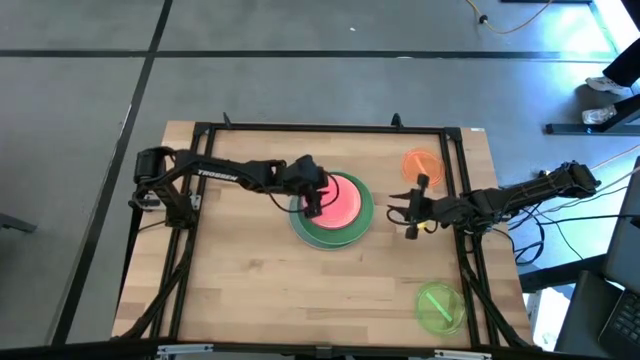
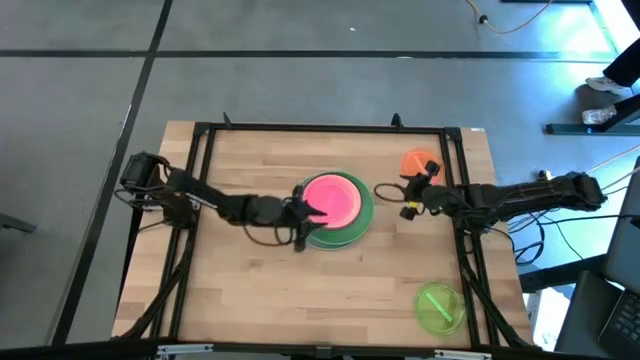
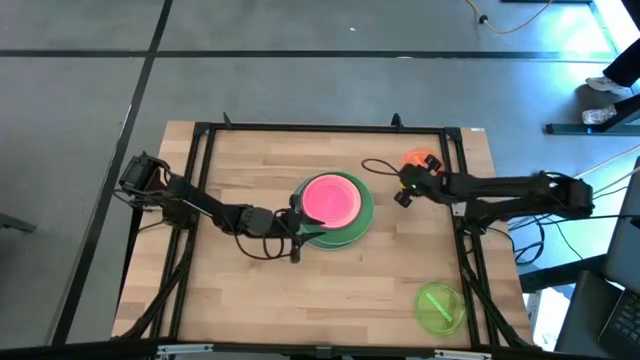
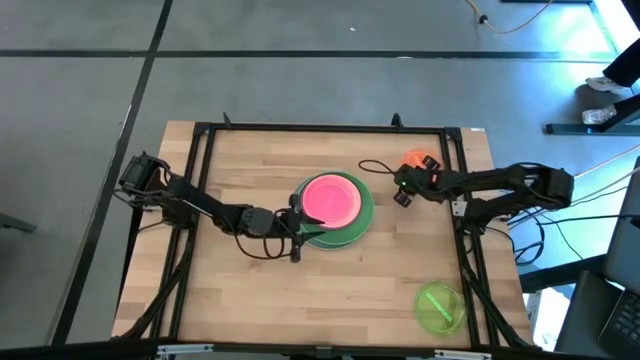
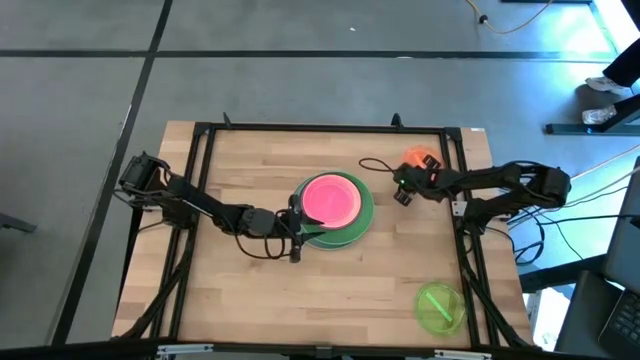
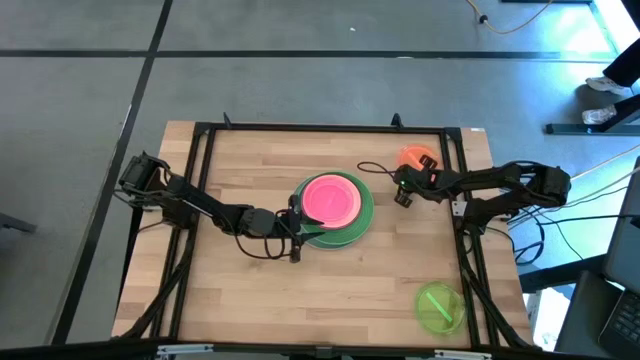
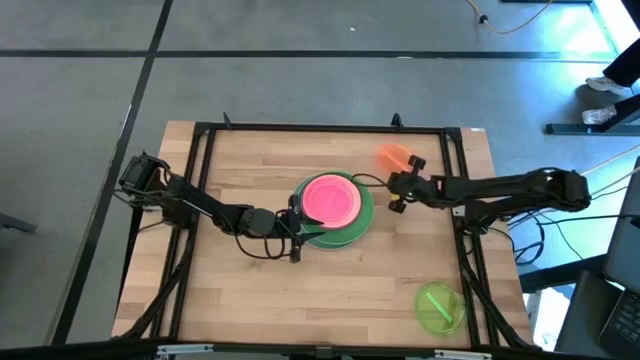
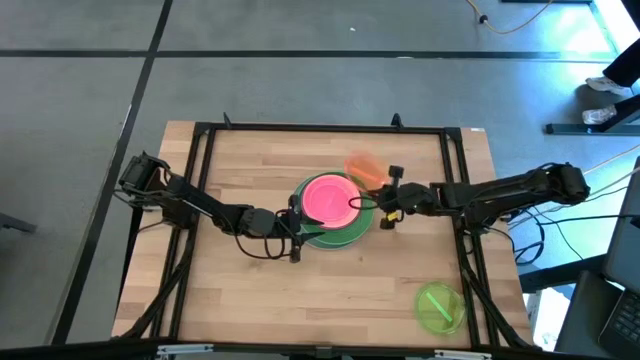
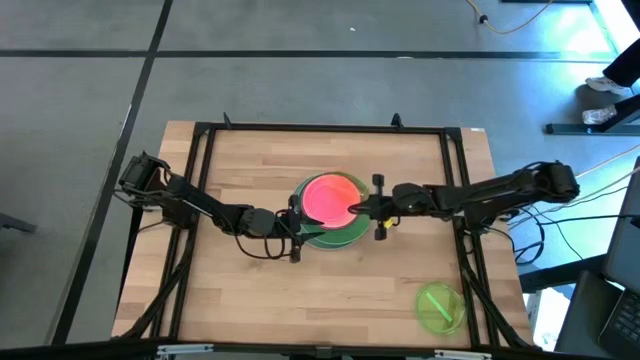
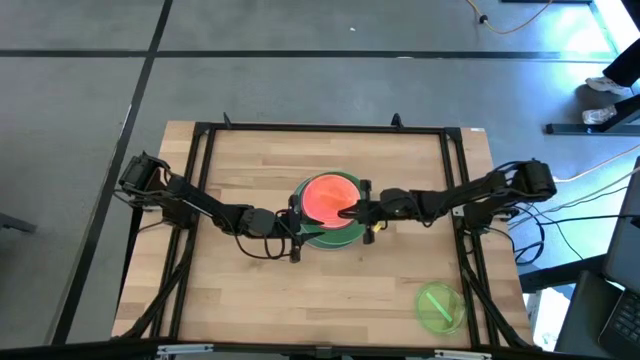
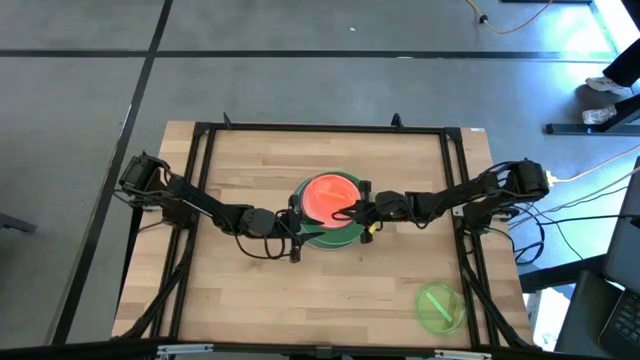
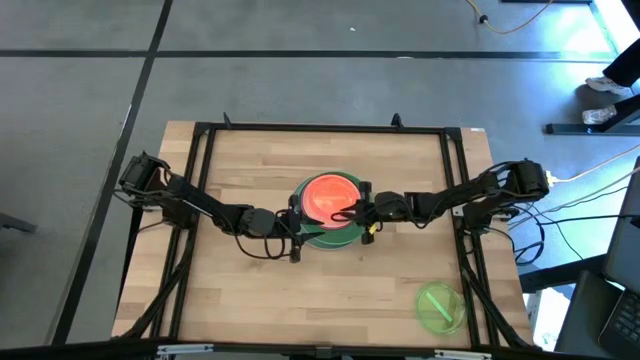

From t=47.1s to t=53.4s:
Task: Stack plastic plates
Stack the orange plate on top of the light pink plate

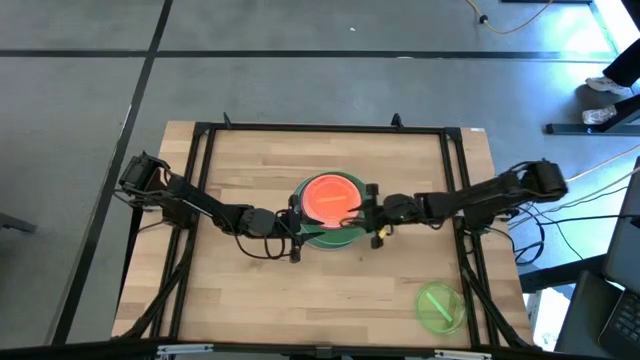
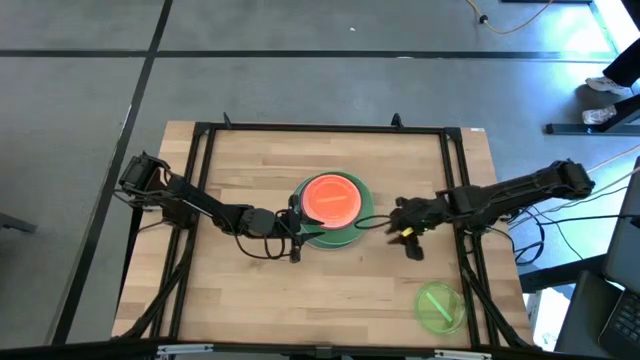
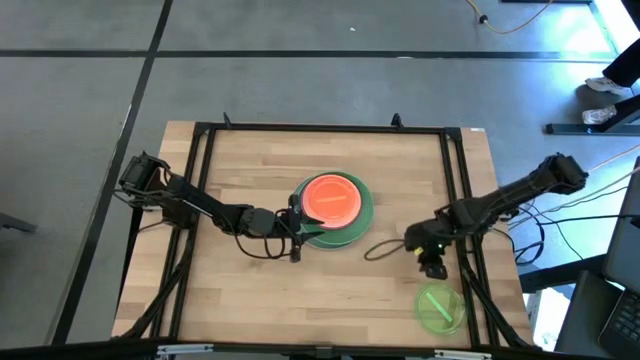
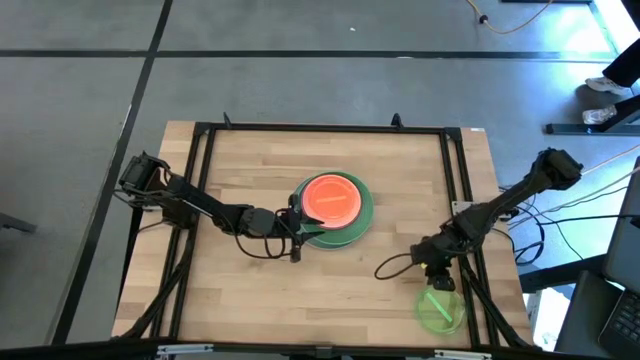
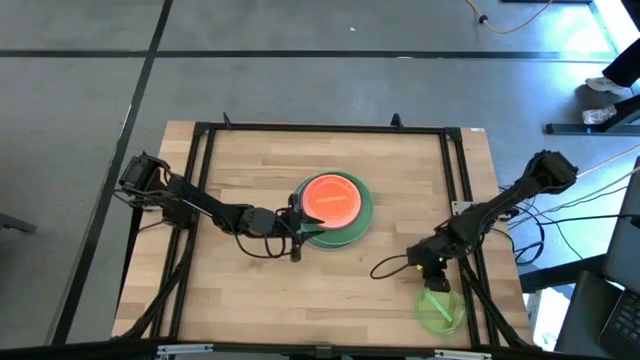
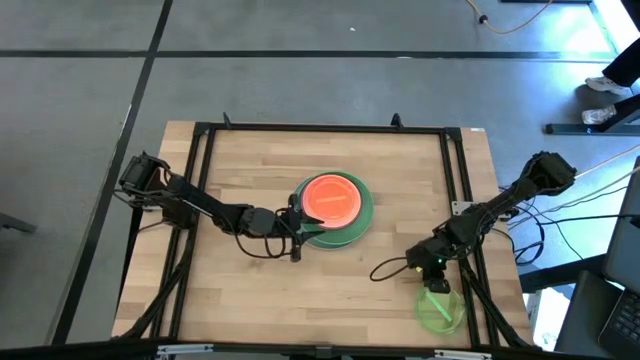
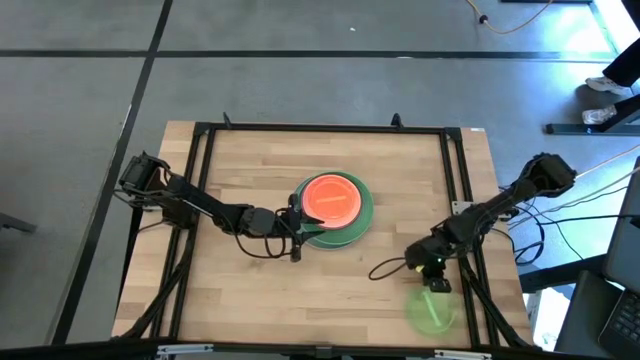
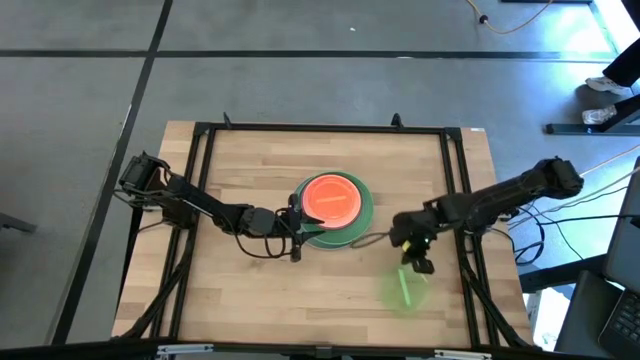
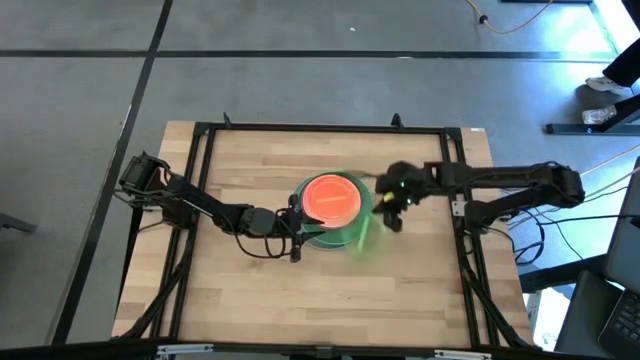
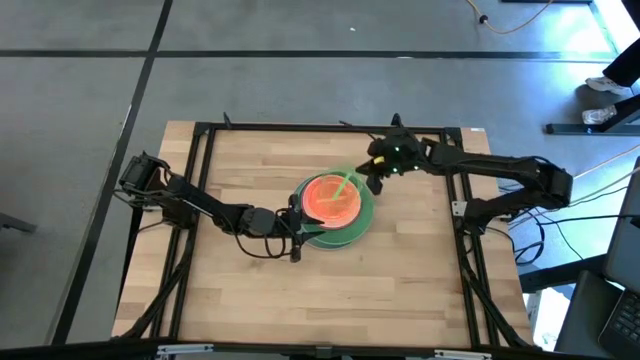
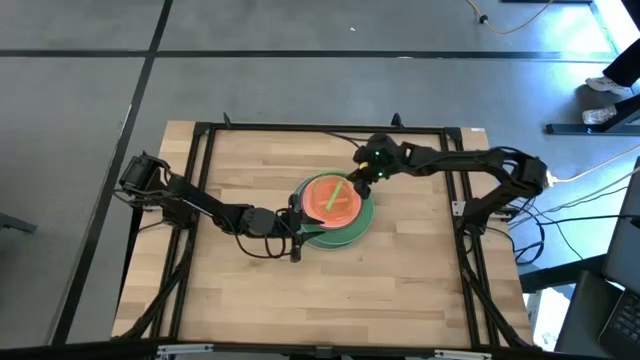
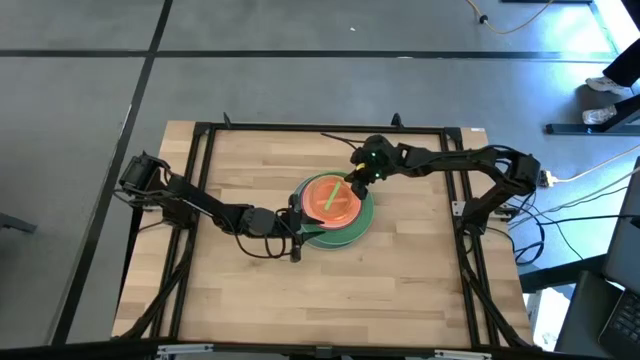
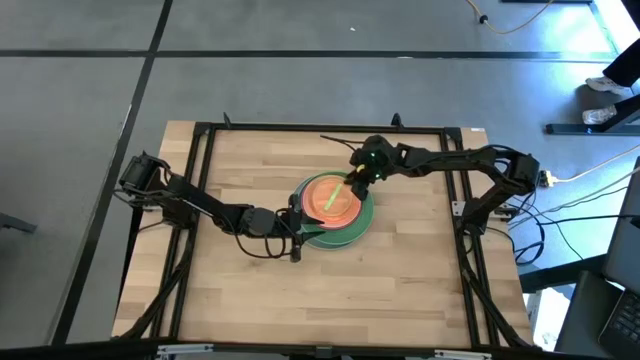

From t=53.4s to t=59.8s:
Stack the light green plate on top of the orange plate

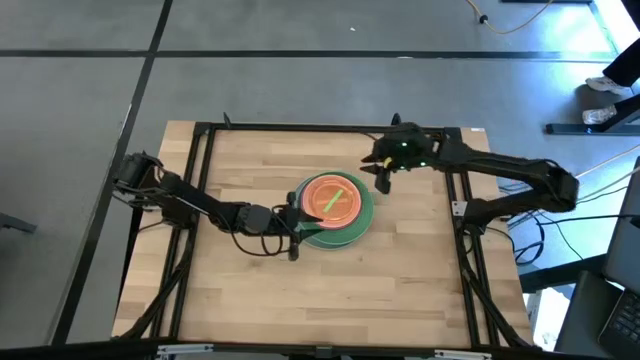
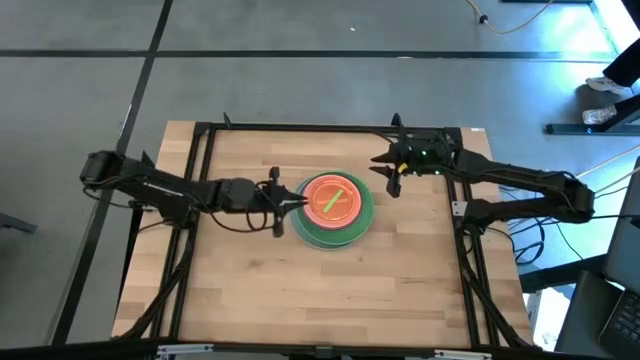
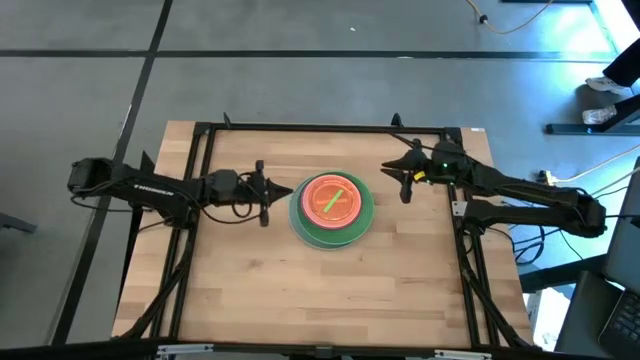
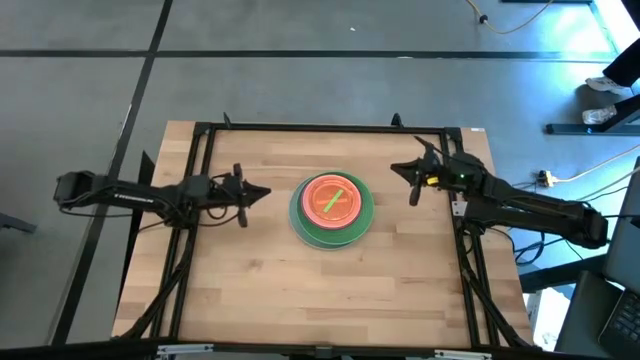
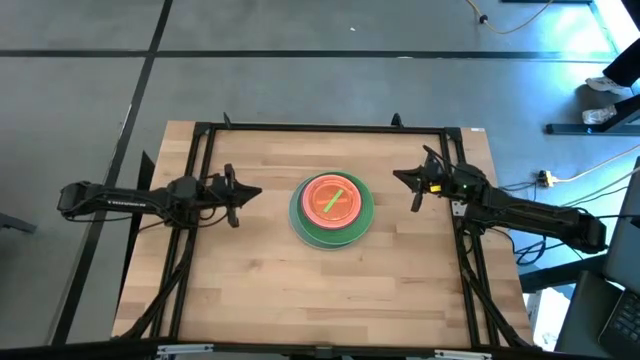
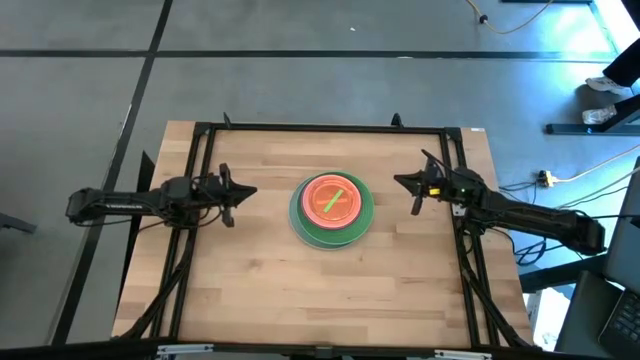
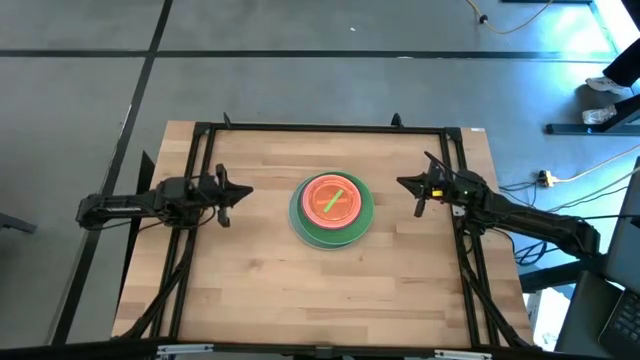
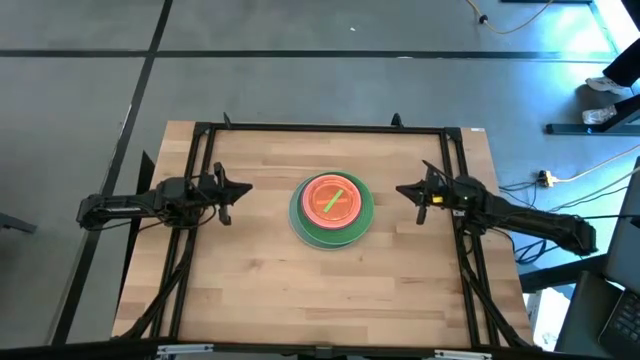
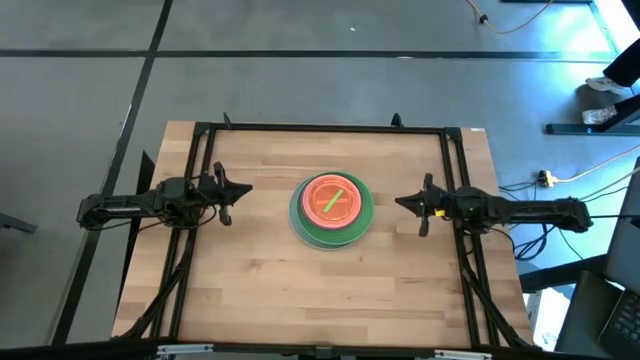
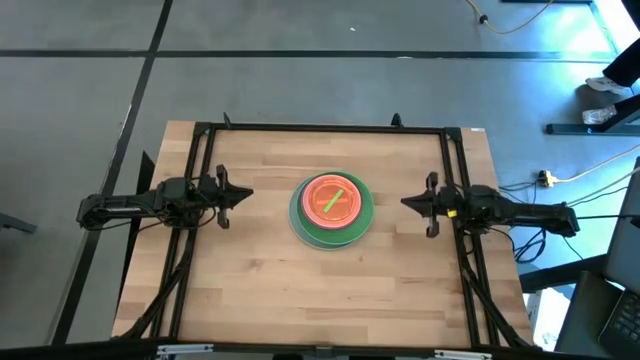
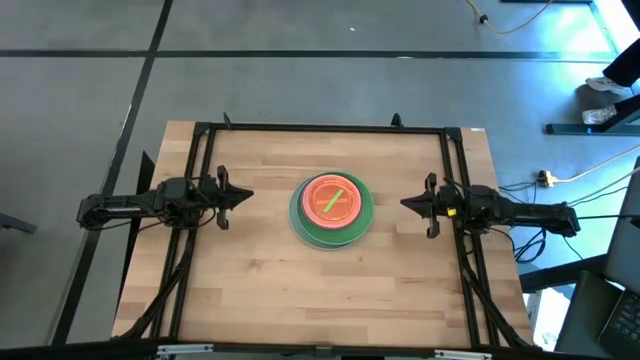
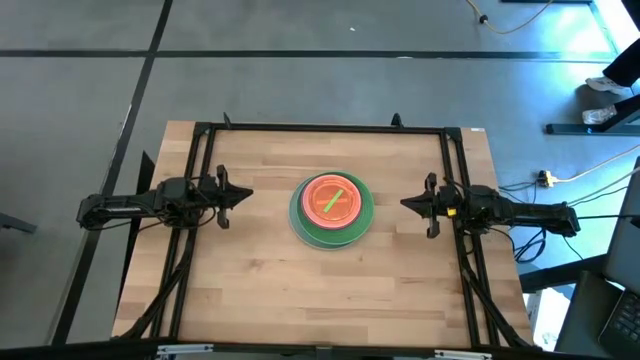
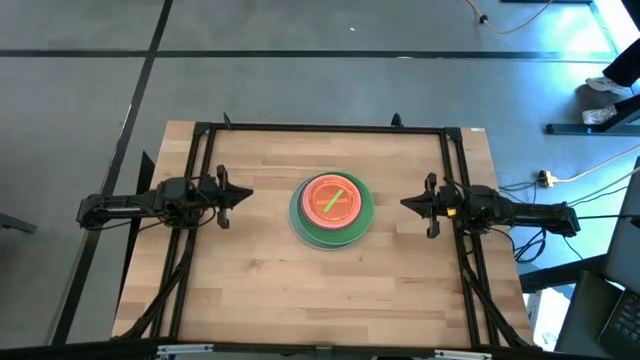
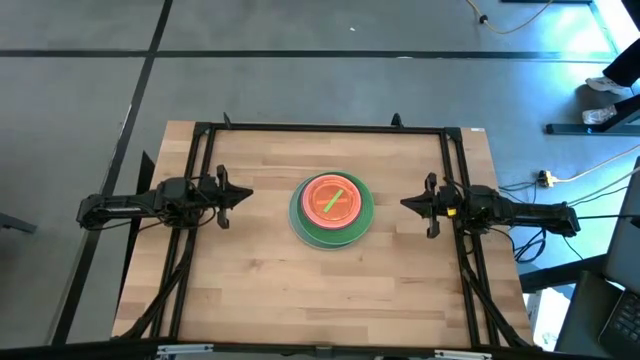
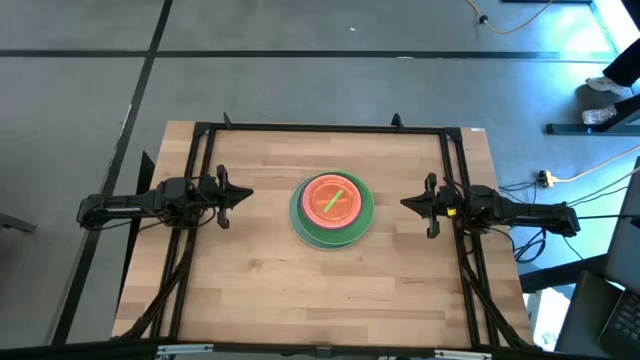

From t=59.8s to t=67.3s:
Return to Home Position

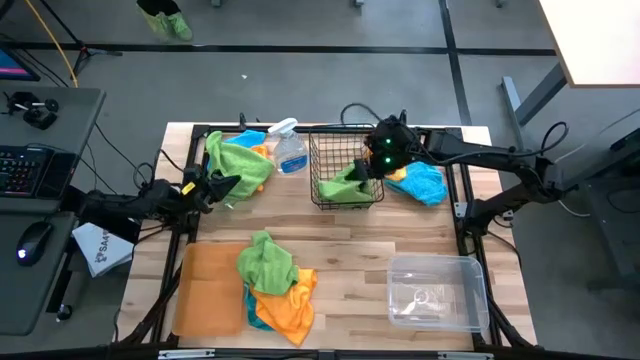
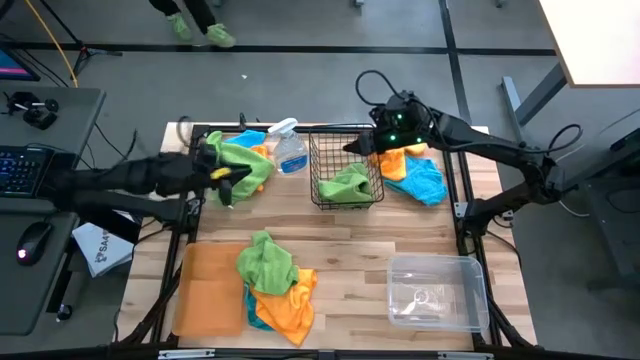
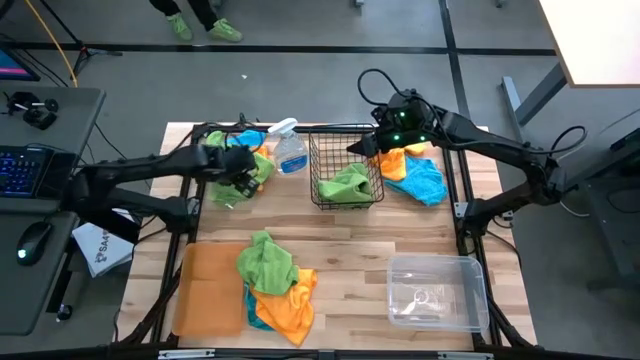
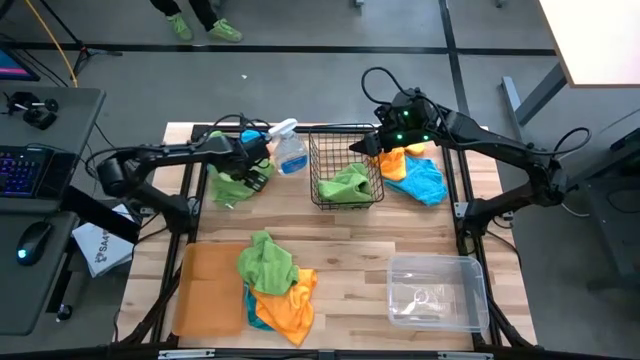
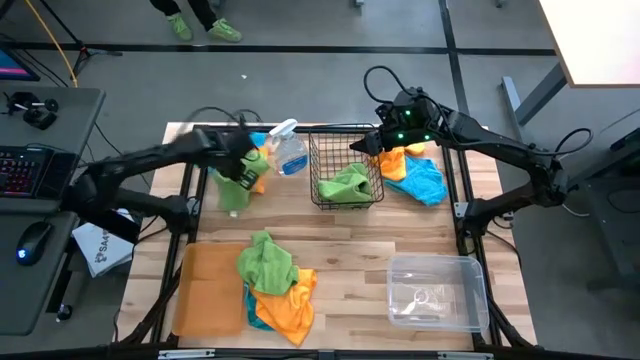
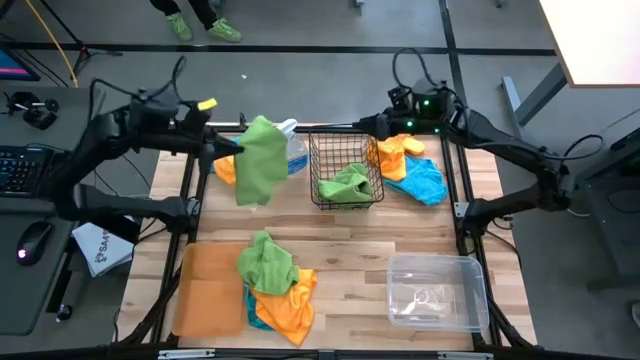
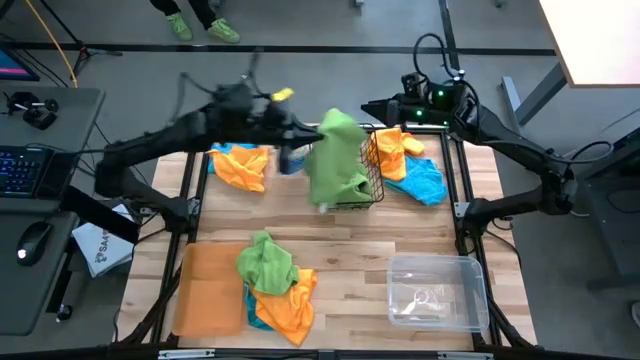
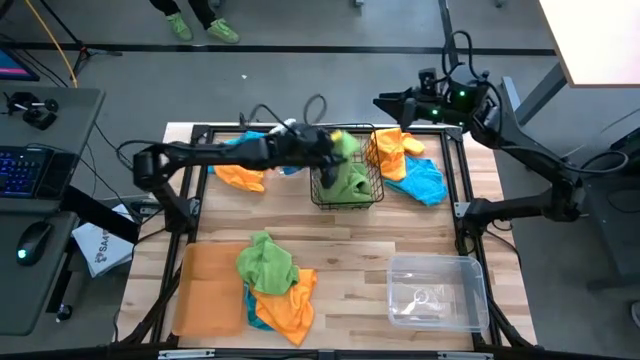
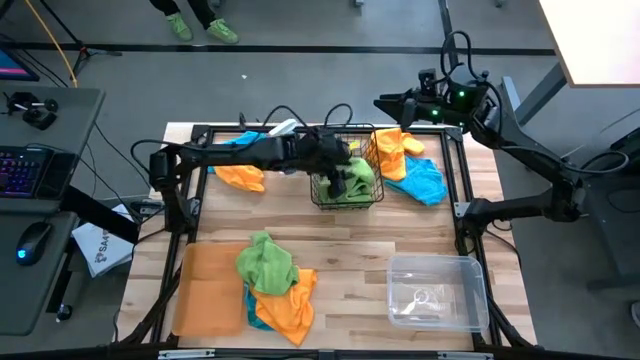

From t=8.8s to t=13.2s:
Task: Sort microfiber towel by color & place in baskets
Put the top green towel into the black wire basket
